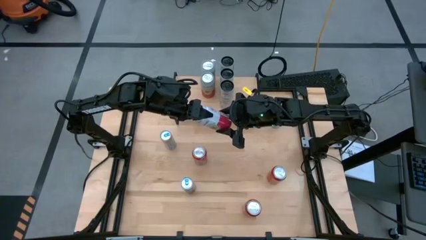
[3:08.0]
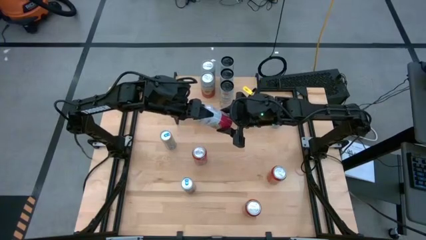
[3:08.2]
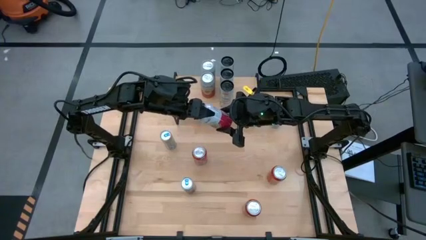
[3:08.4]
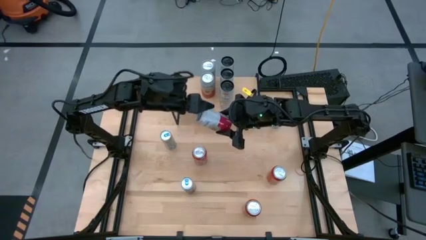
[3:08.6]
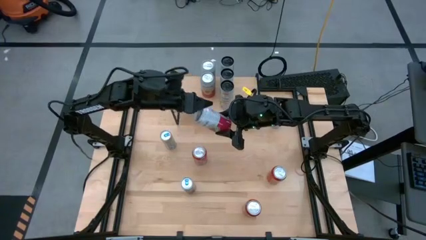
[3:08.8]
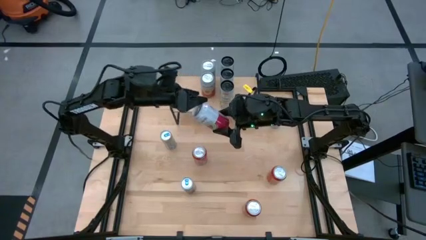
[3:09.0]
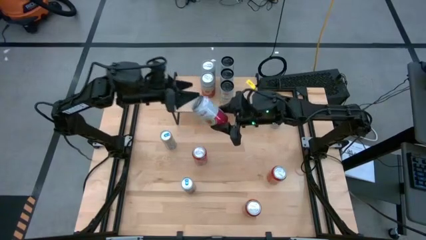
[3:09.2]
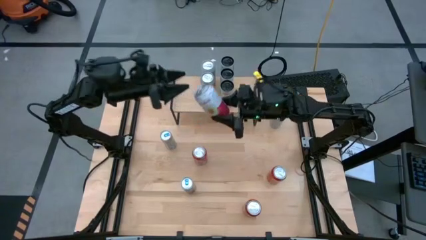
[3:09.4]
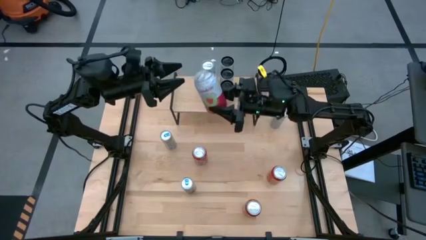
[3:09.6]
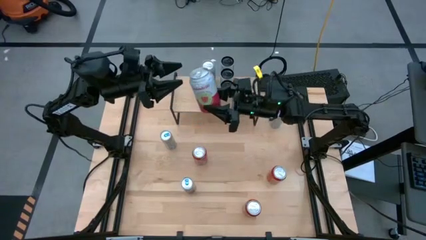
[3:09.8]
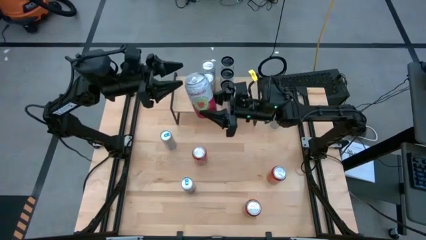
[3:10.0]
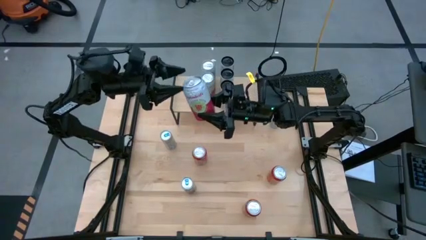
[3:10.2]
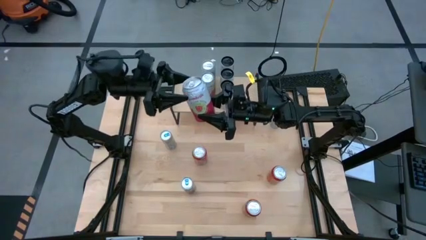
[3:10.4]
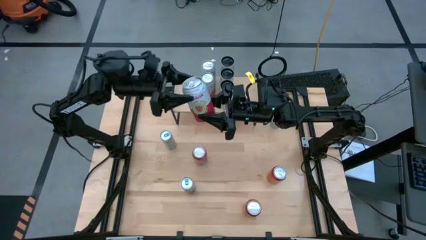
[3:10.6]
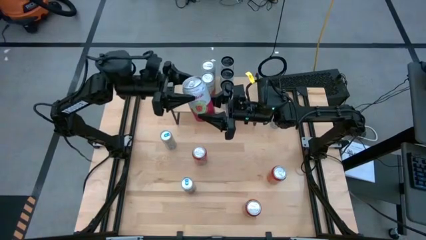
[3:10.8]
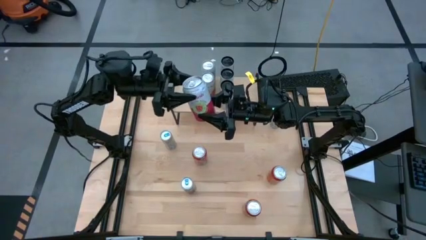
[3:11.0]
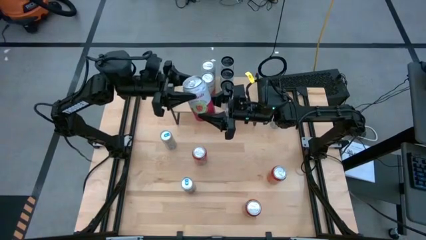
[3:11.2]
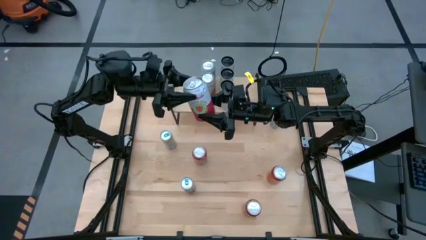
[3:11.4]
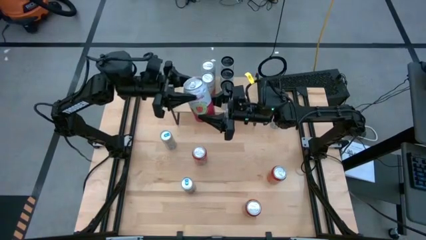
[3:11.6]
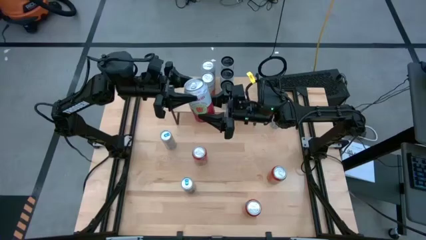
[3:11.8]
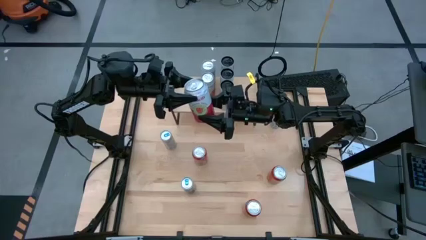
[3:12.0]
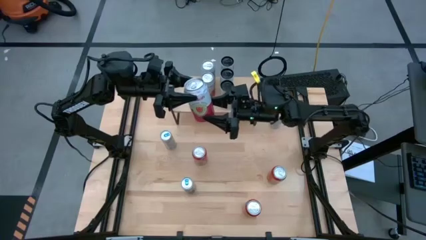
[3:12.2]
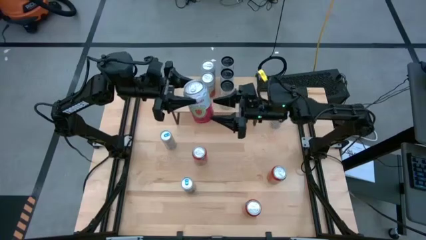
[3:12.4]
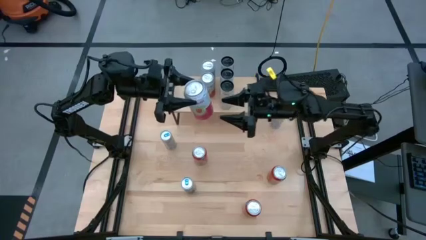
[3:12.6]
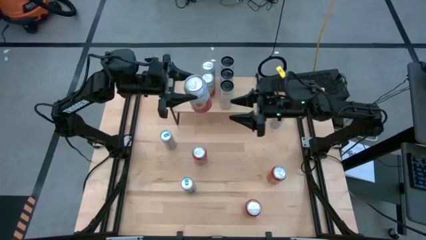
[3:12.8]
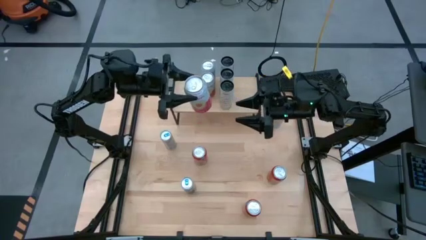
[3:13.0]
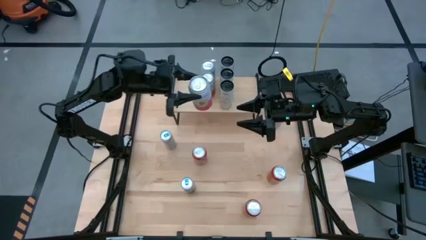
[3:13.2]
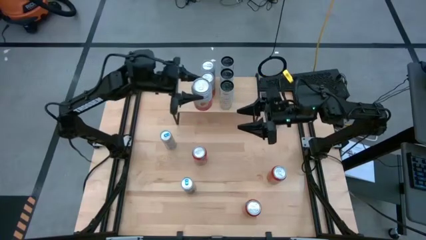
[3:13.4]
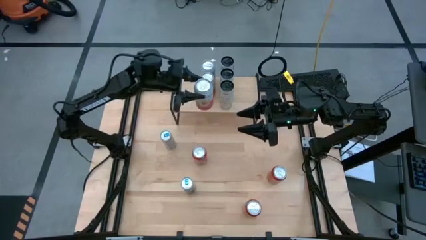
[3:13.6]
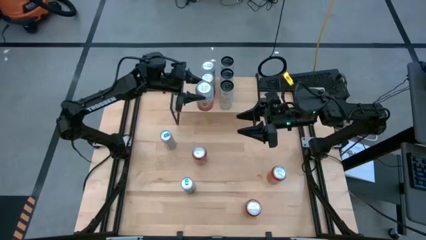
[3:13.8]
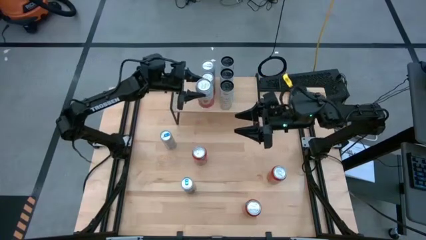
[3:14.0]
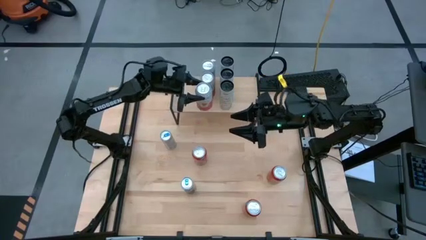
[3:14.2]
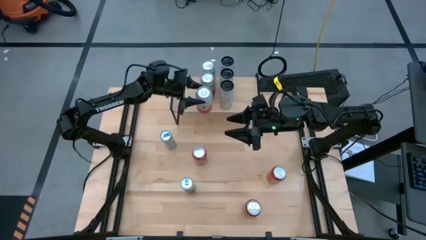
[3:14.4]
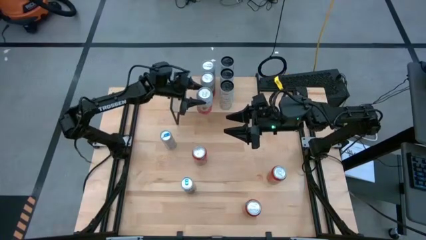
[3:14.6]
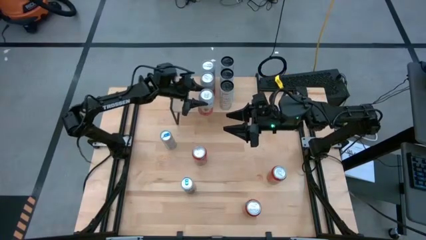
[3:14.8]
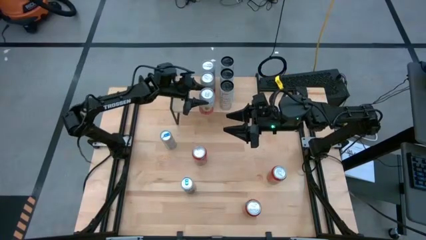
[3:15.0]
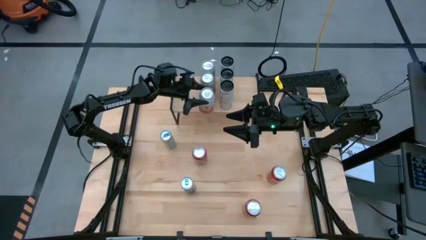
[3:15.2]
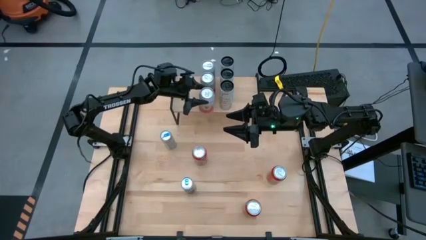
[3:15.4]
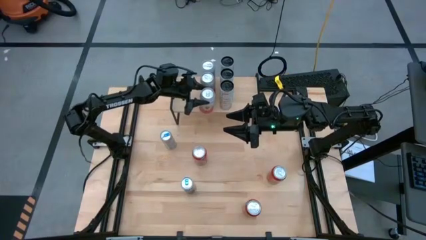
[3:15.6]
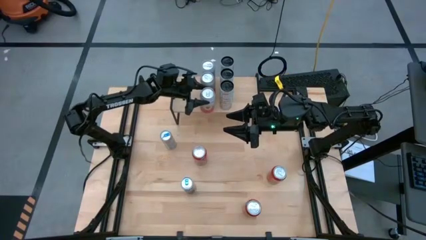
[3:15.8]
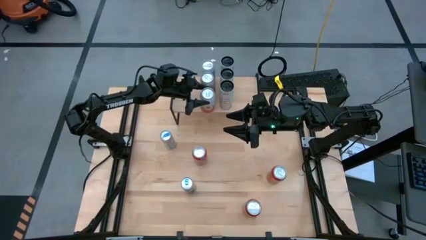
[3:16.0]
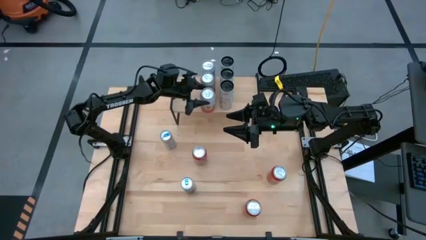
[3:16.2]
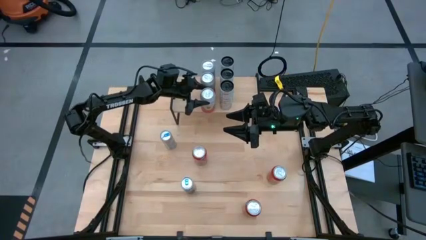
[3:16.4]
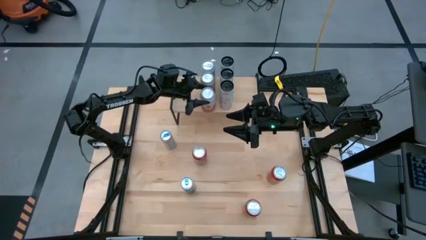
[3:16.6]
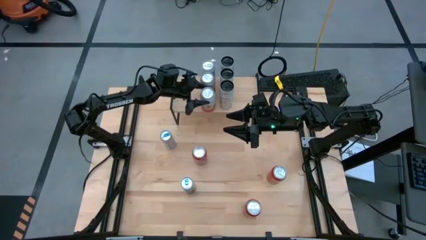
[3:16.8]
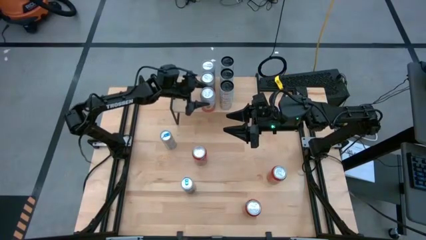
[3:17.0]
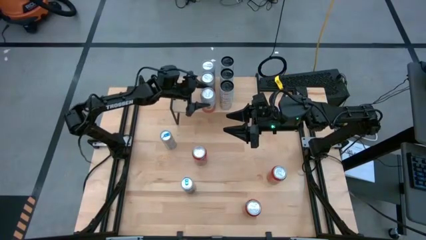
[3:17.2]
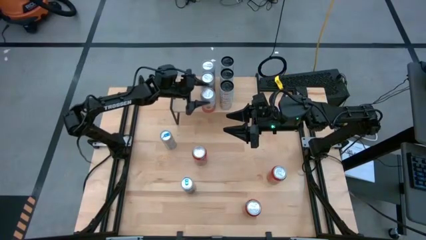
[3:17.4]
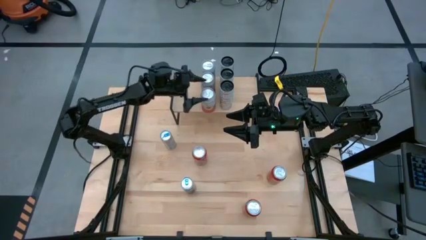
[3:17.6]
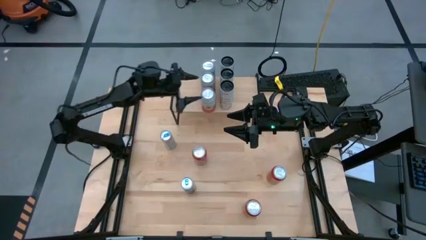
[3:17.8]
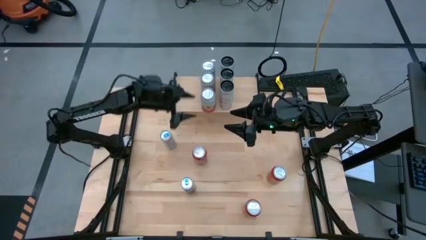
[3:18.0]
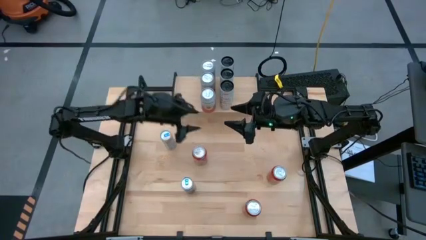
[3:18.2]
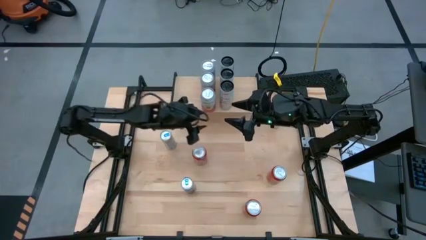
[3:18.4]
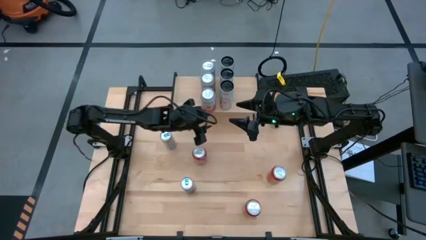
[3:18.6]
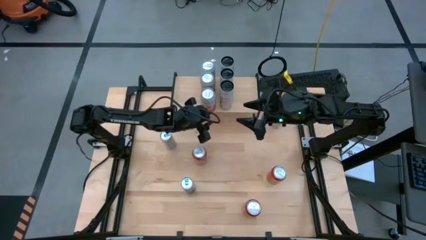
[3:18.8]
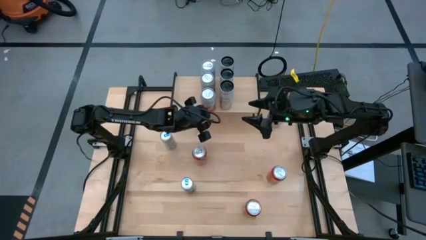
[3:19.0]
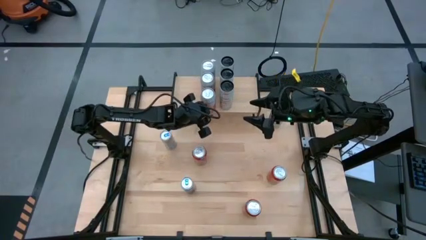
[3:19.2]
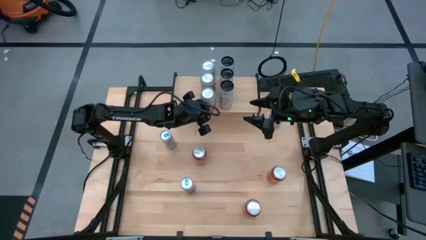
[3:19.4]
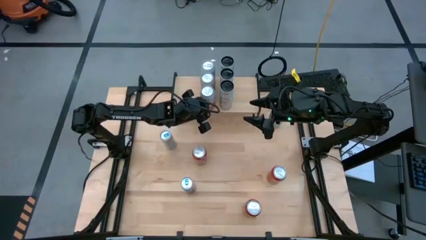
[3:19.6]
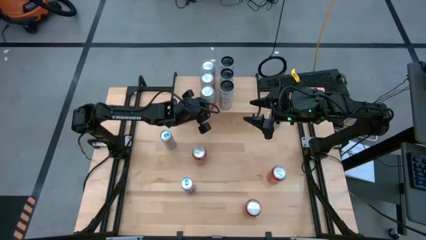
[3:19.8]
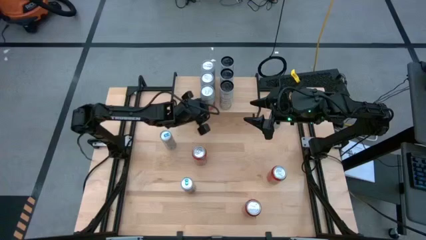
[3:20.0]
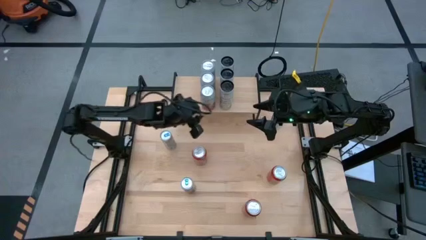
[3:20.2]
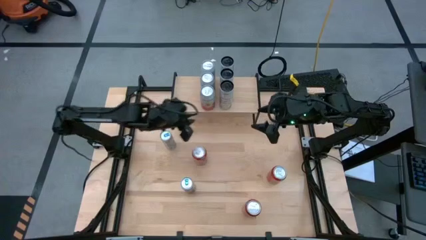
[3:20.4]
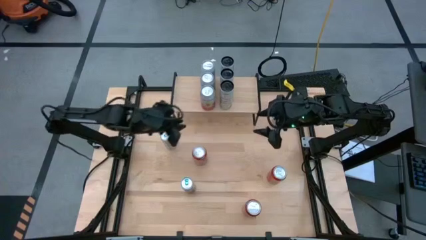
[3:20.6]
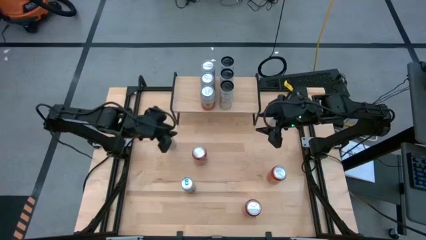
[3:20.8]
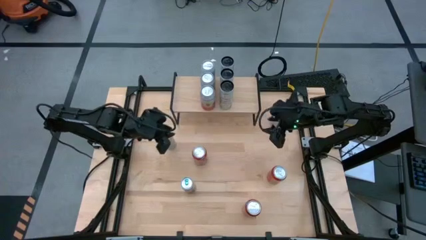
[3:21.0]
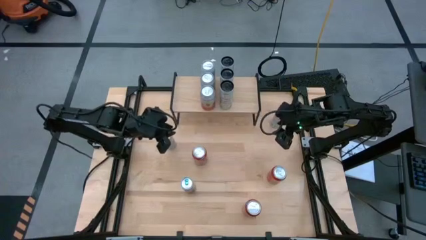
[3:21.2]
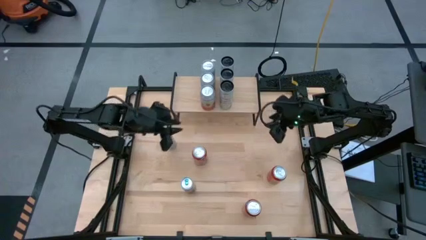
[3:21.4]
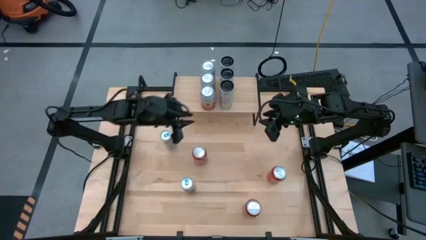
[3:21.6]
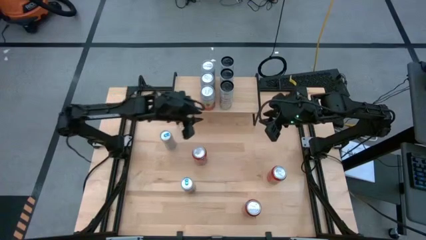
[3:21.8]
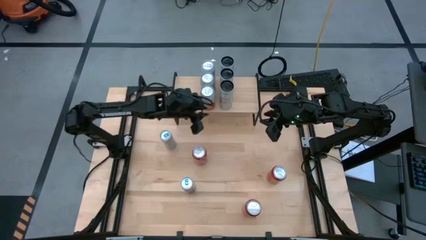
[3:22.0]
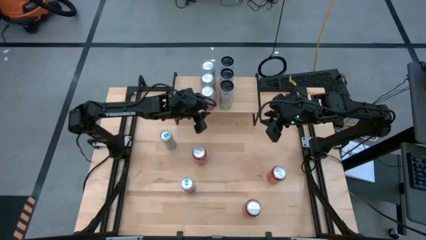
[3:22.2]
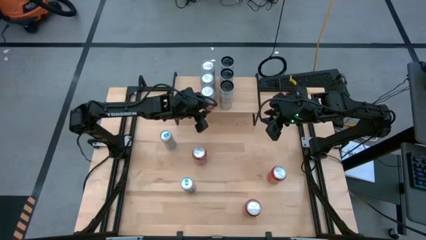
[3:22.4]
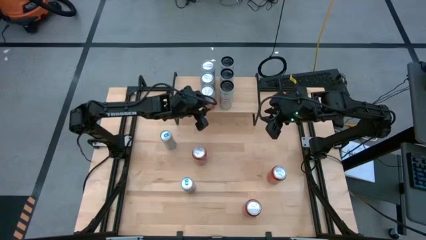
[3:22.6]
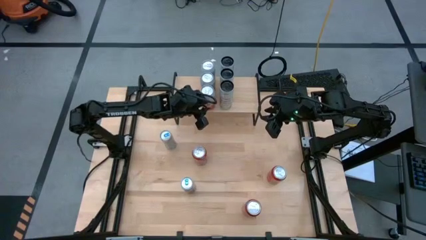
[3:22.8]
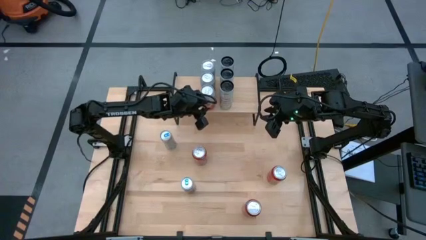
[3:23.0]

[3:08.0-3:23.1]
Task: Place canned beverage on shelf
Put the pink-white soda can aligned with the other pink-white can on the shelf
